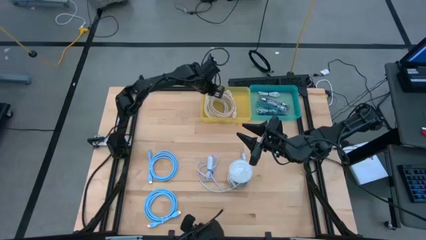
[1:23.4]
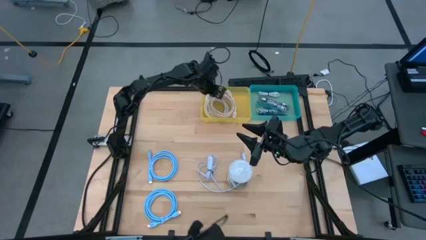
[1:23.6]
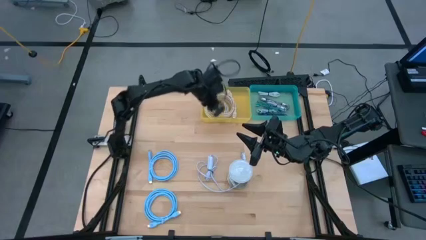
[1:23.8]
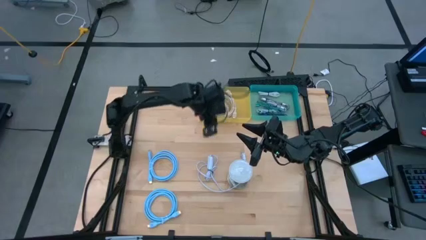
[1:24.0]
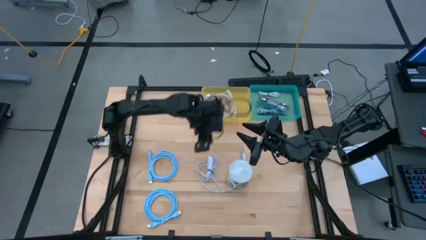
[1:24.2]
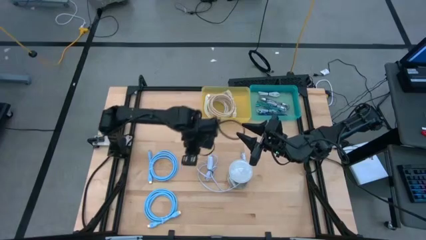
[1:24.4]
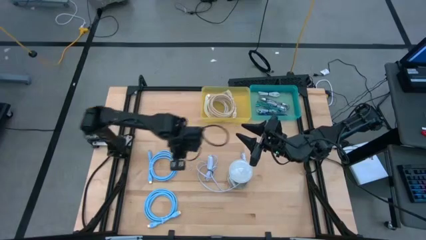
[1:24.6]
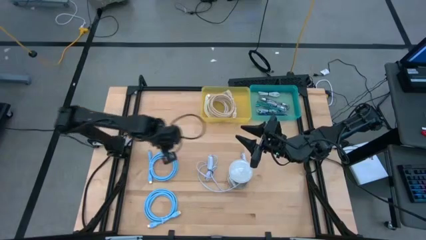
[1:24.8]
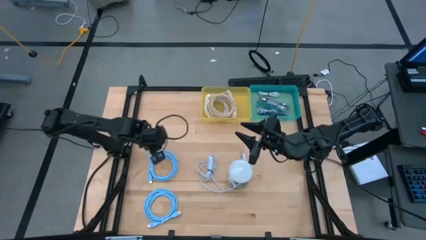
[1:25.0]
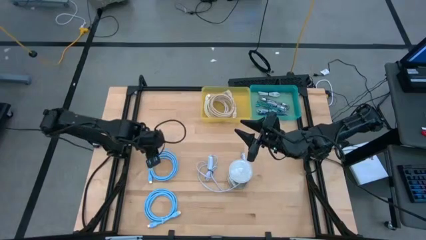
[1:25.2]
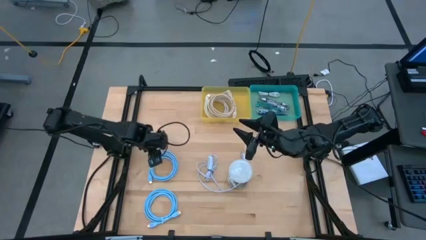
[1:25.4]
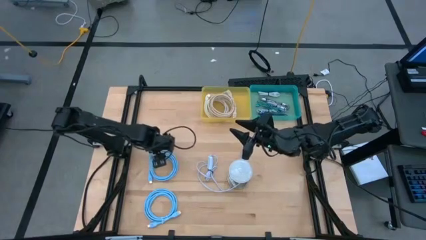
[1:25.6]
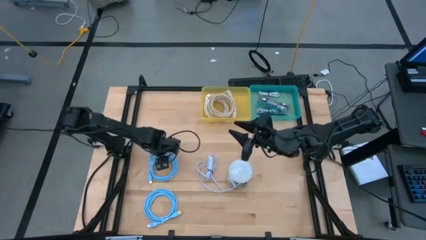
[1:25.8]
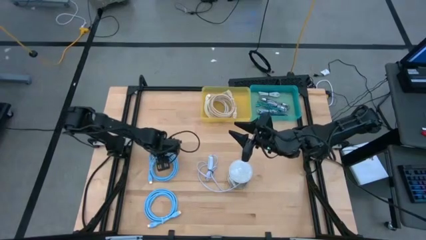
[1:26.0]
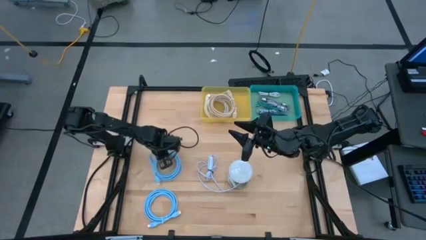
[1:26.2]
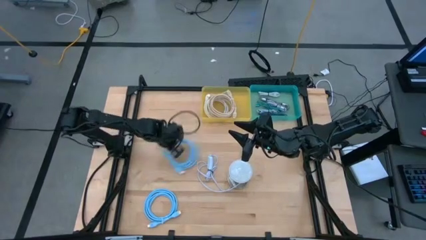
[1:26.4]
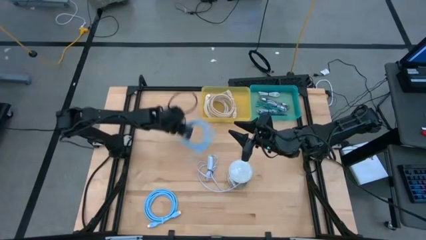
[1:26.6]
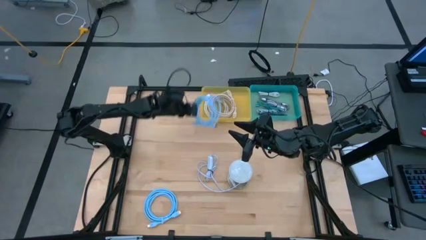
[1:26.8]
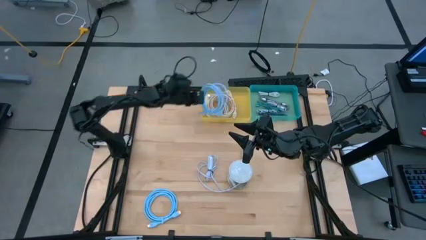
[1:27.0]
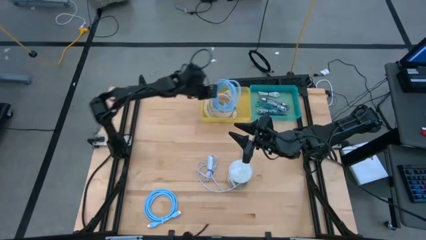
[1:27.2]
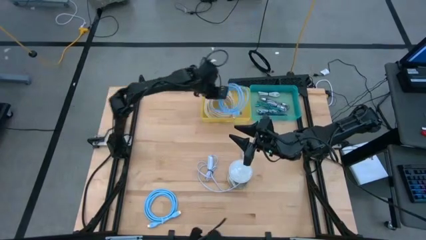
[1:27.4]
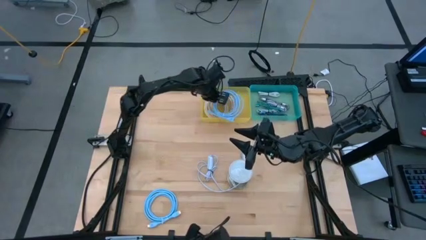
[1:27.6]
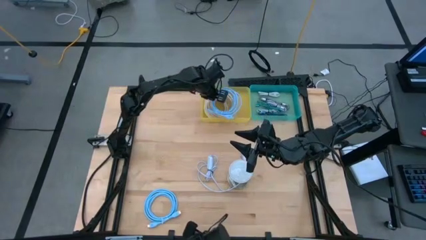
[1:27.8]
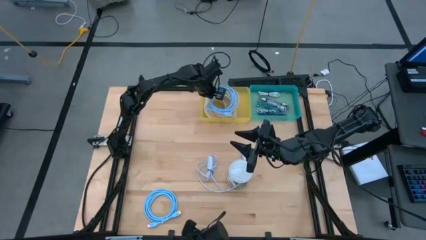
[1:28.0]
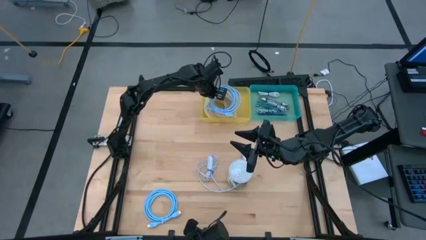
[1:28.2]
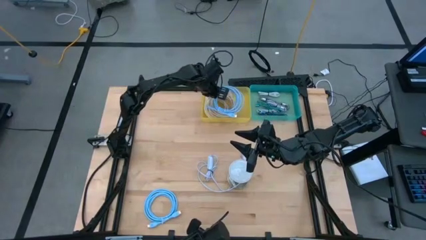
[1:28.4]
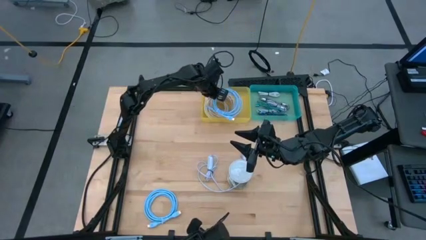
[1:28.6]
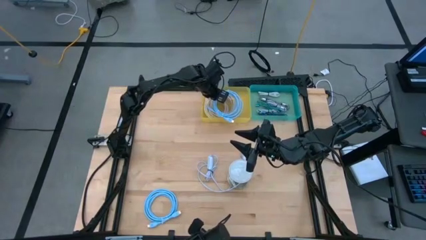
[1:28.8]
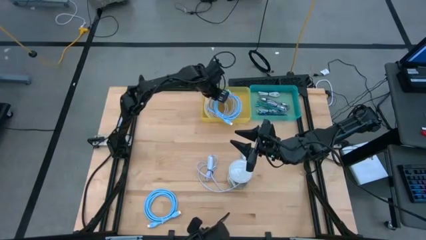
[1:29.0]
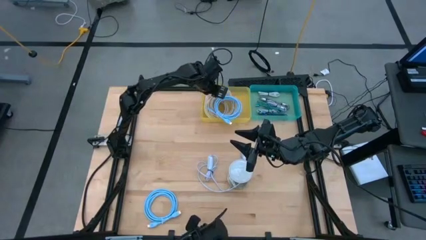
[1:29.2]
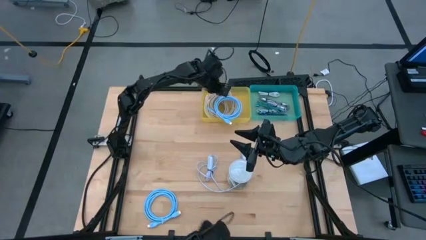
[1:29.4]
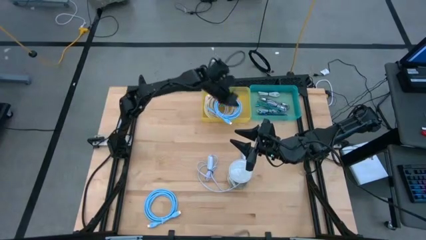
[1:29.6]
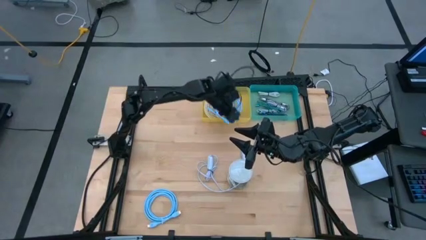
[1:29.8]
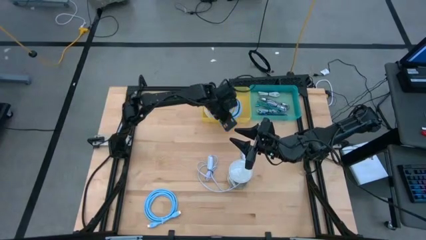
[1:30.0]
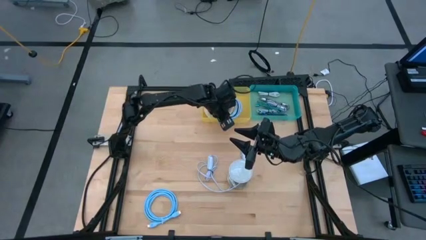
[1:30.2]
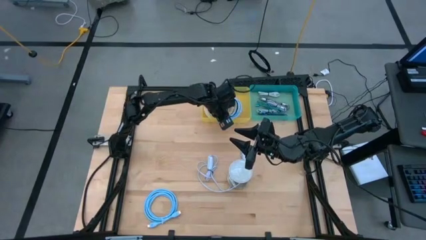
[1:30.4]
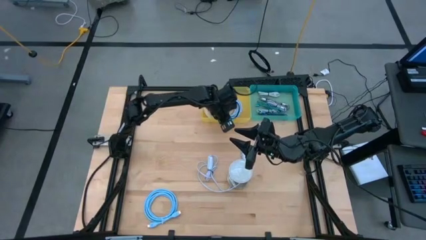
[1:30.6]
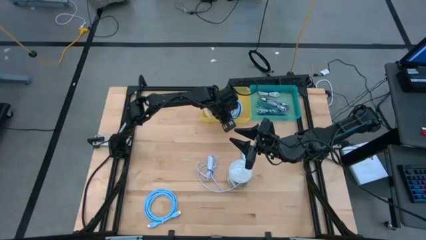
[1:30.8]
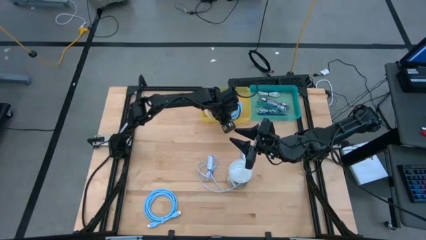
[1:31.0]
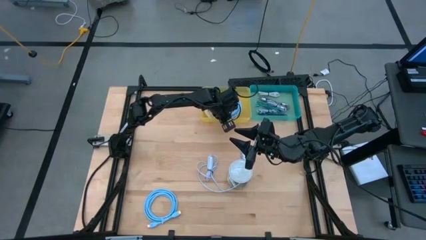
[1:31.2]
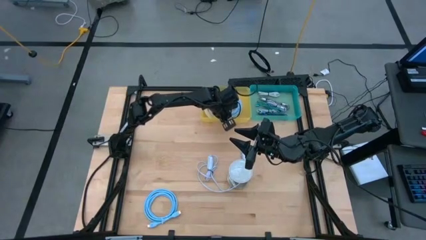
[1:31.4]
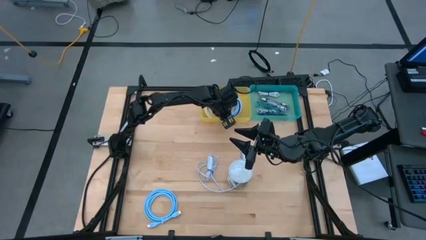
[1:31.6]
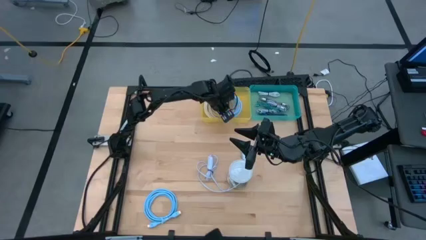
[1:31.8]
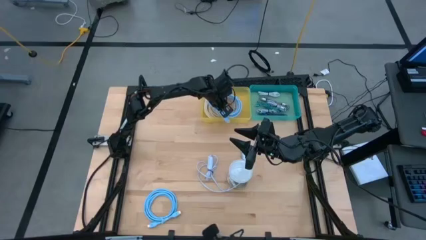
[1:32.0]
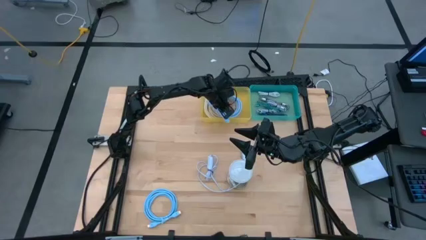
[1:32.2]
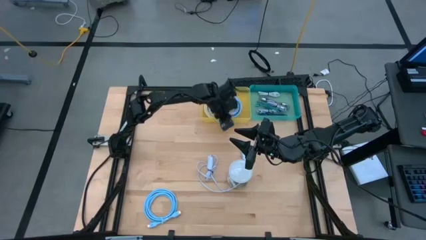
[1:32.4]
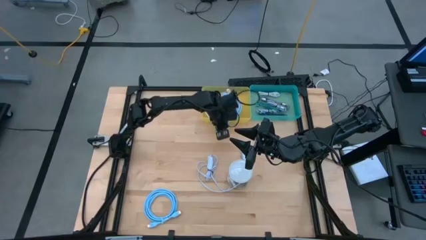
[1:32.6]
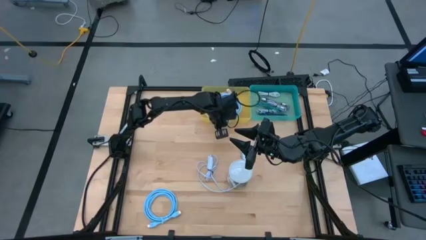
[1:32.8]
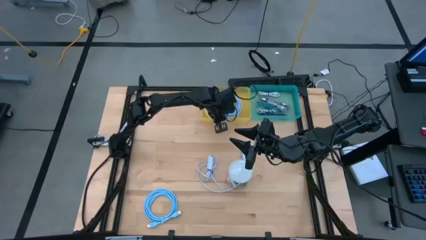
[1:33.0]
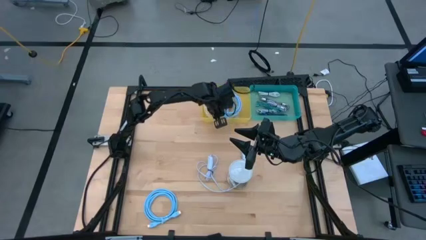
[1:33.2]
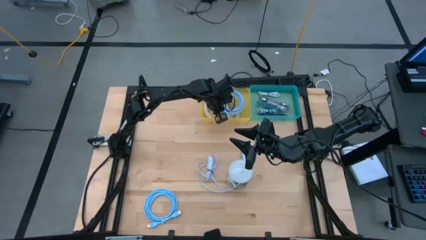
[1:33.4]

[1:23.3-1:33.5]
Task: Pick & Place USB Port
Put the top blue HDMI cable into the yellow bin

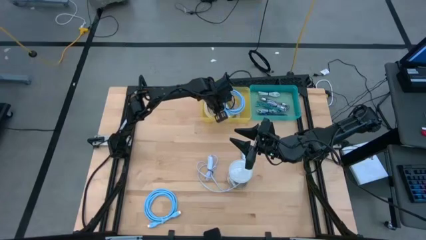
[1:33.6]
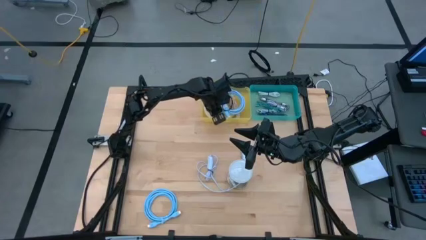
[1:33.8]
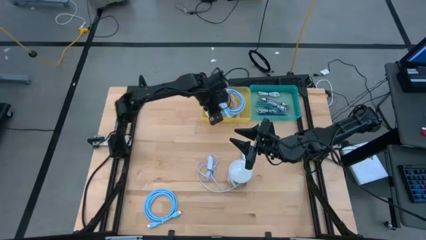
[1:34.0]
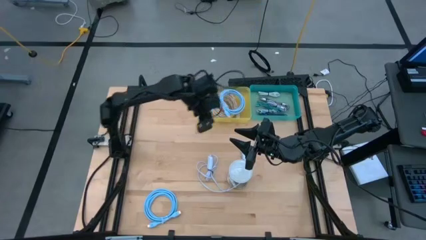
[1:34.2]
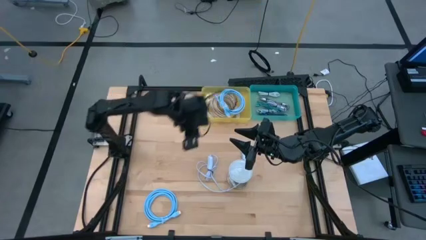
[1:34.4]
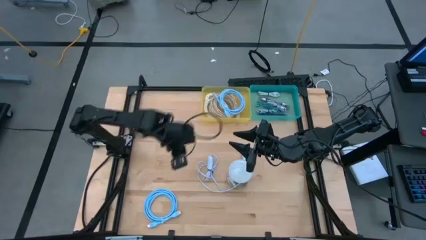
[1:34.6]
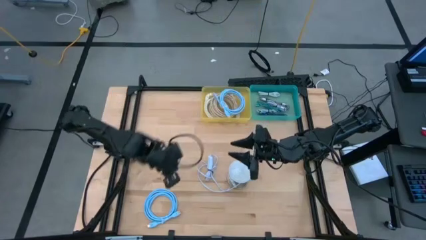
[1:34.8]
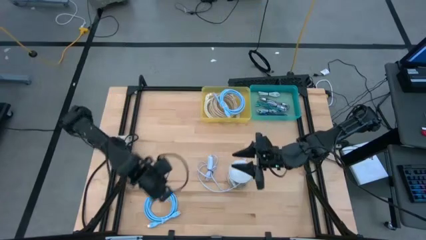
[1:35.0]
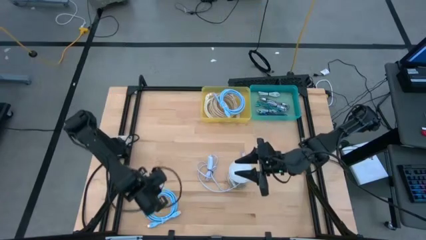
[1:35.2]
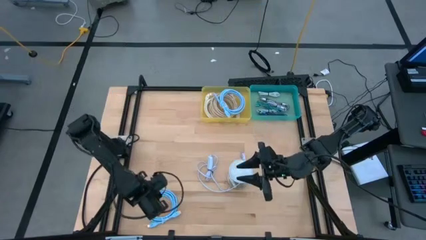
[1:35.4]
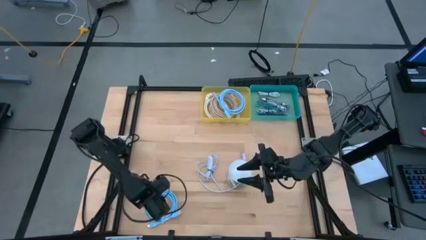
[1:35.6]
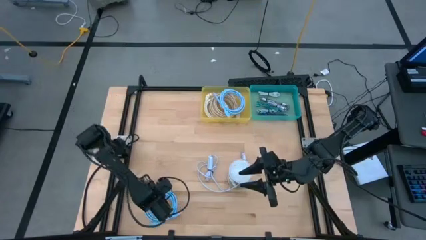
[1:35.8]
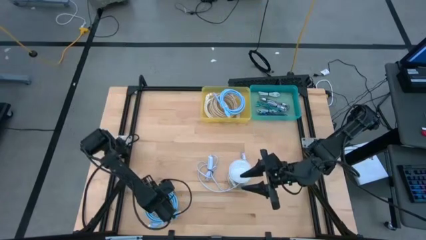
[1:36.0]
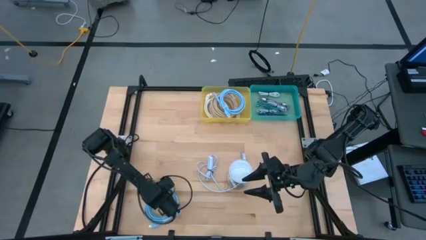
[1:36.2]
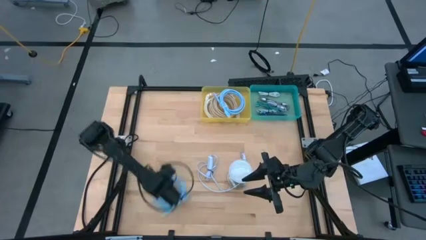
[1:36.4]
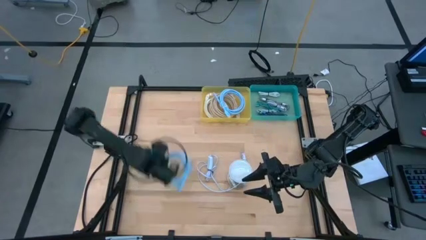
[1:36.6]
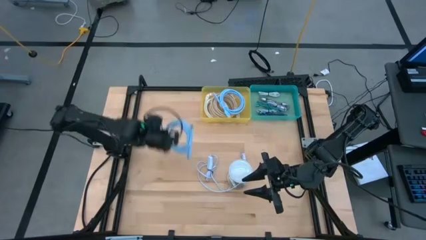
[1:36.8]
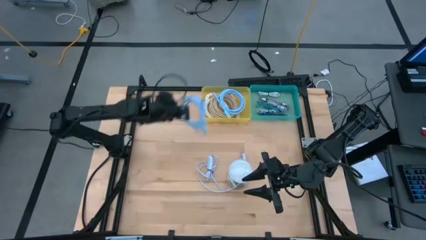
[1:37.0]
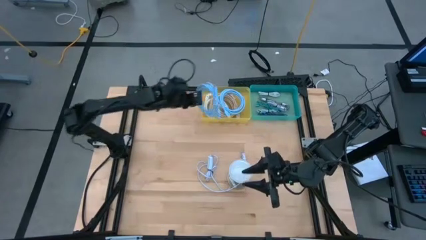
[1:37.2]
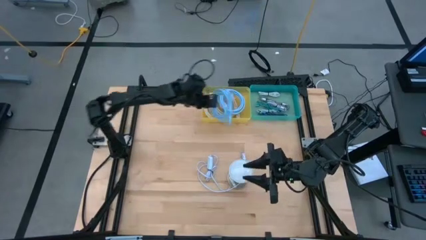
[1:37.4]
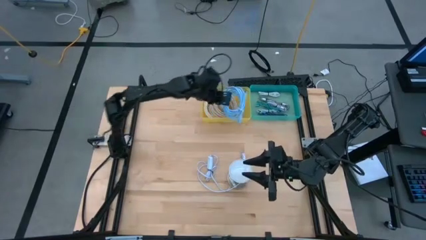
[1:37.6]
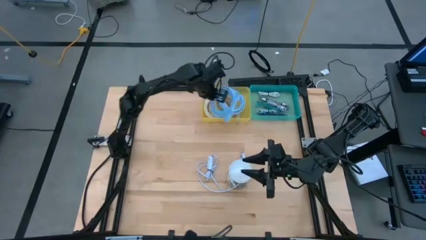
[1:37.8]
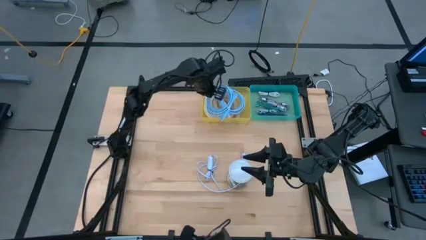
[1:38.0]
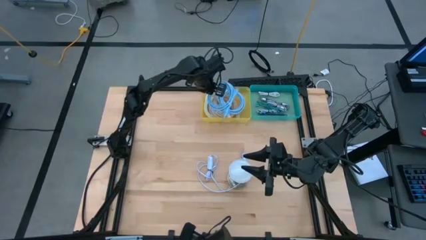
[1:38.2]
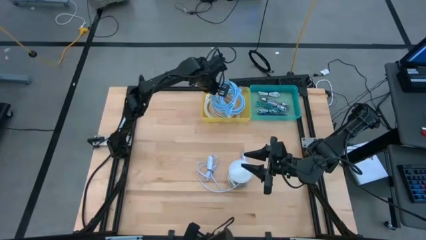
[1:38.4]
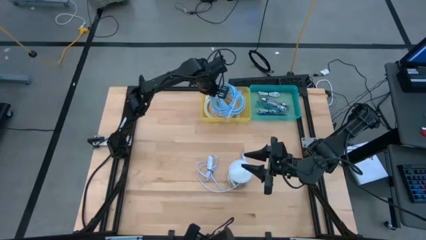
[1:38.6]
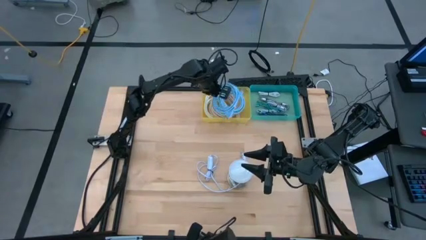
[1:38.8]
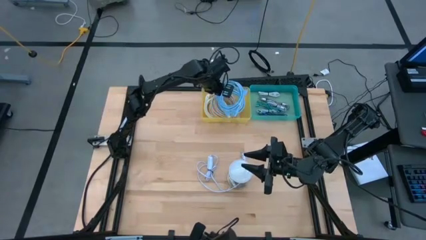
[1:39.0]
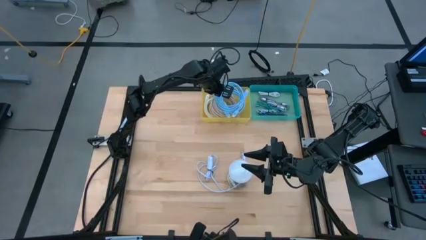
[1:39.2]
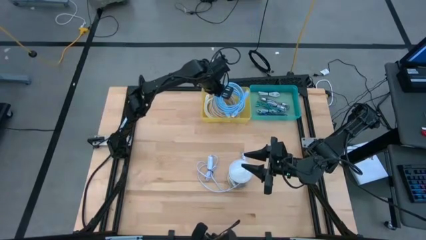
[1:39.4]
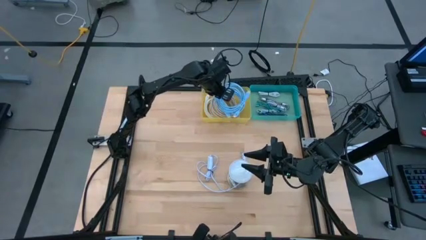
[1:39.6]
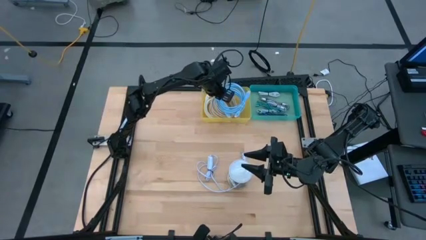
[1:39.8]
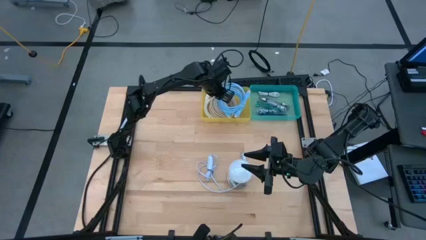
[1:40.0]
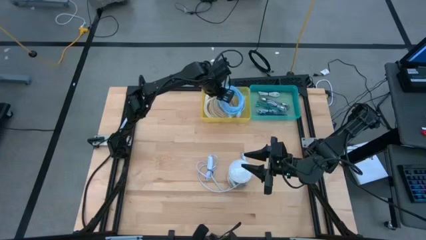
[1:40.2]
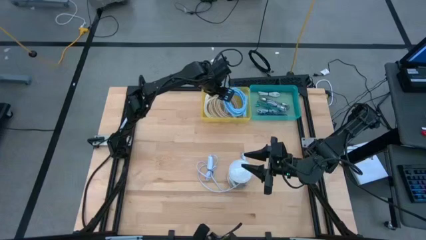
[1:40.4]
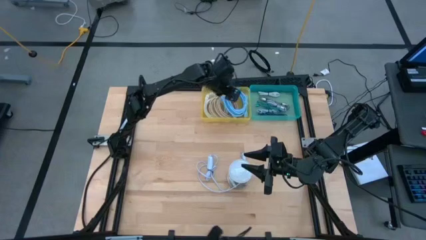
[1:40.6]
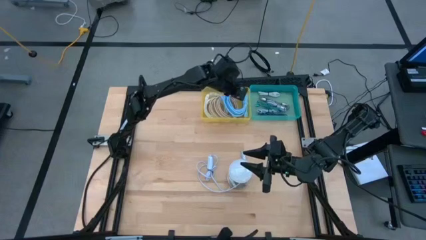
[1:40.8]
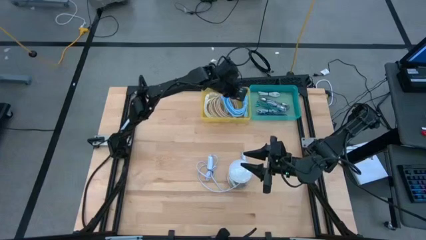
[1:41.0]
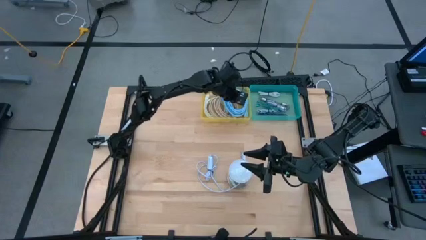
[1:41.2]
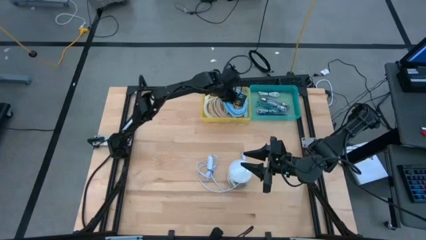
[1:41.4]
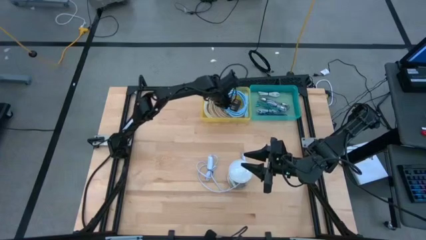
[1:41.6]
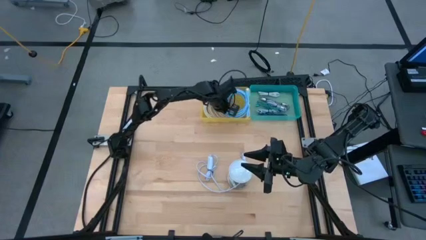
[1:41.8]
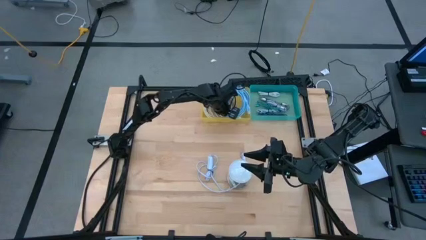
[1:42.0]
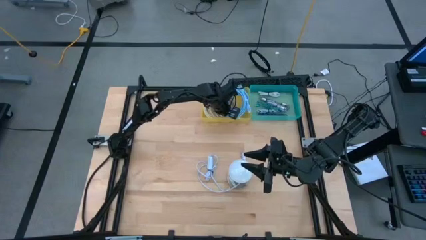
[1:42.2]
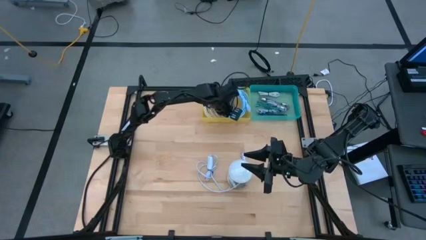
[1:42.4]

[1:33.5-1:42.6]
Put the blue HDMI cable into the yellow bin
